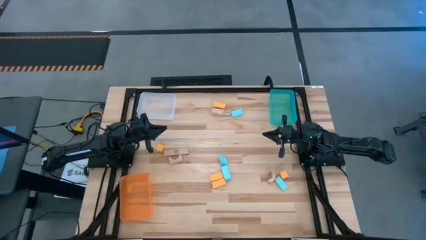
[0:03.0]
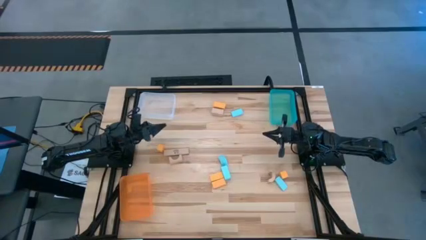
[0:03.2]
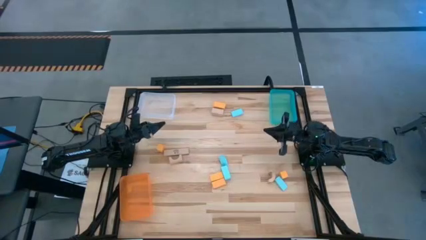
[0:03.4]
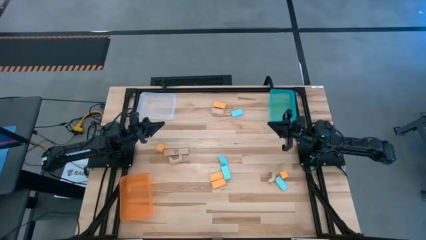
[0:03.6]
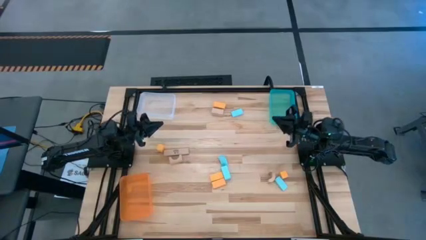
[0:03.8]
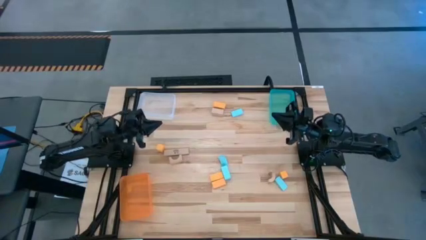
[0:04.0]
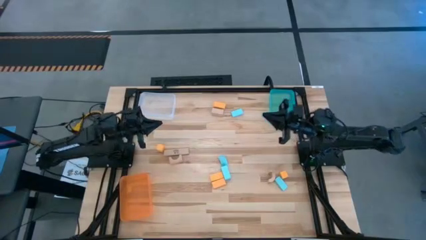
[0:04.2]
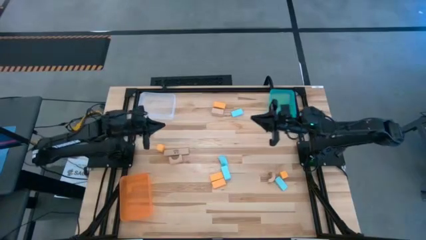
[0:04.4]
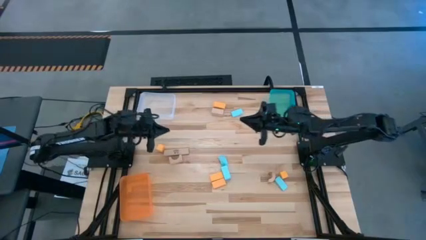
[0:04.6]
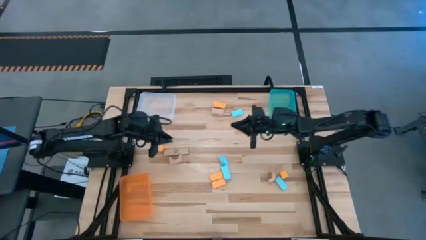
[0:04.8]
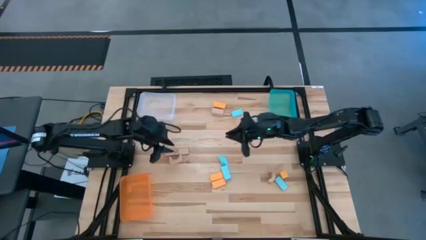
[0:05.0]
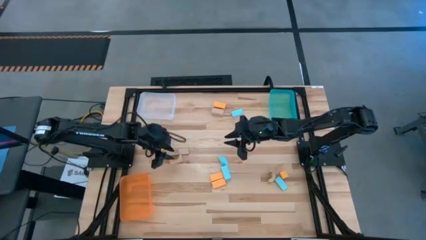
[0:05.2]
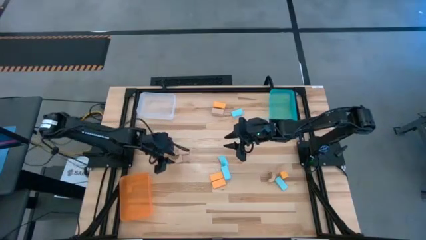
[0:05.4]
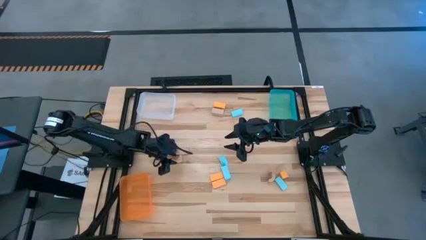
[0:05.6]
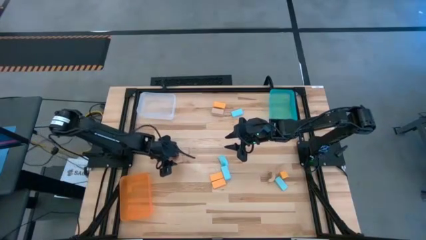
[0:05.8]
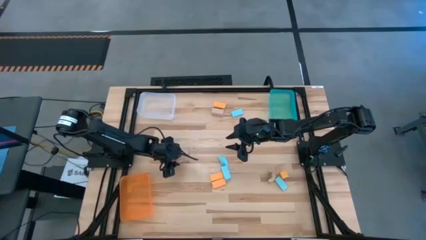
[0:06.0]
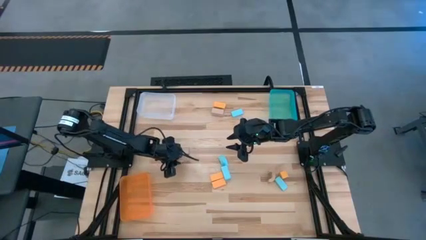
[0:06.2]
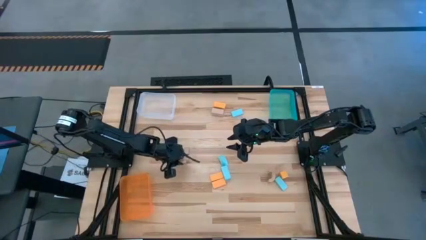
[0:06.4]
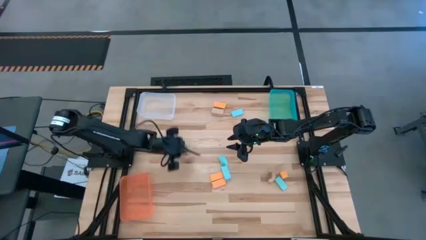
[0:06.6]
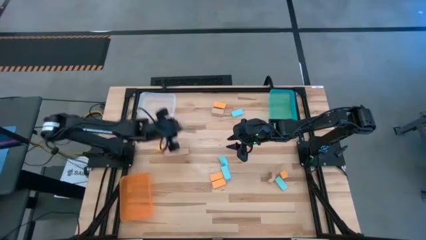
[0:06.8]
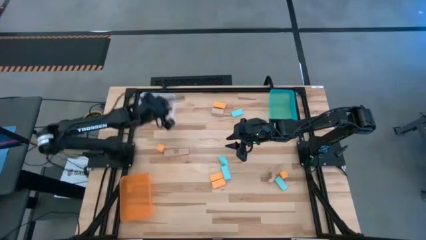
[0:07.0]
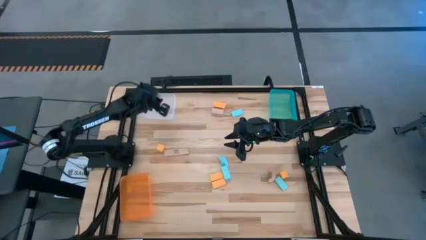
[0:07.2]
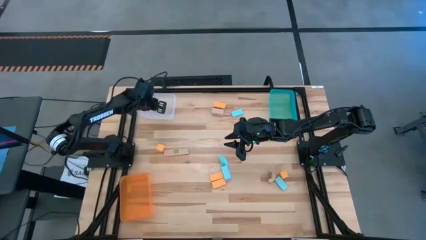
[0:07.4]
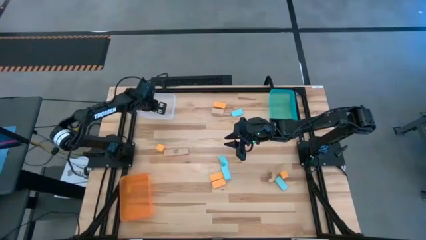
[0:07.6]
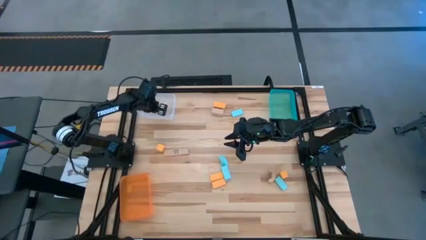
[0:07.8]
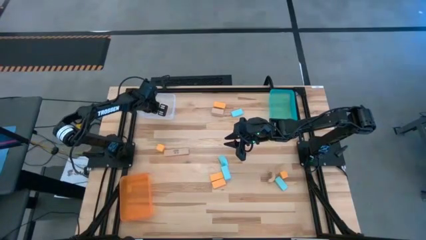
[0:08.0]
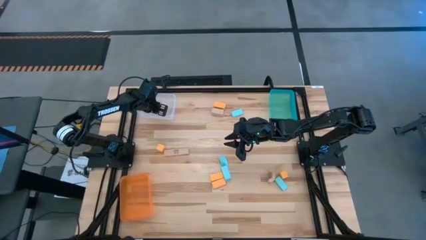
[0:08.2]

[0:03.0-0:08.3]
Task: Sort & place blocks by color
Put the brown block into the transparent bin

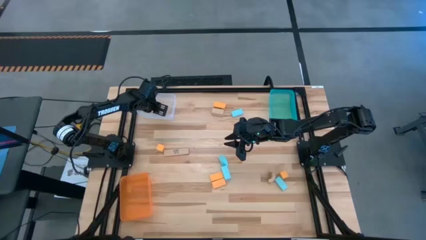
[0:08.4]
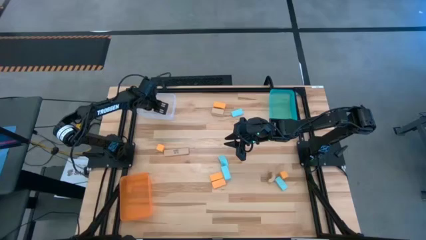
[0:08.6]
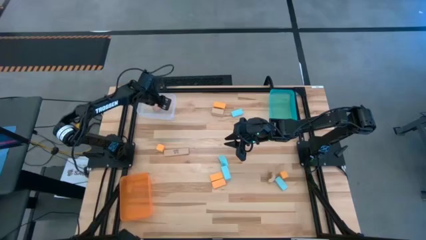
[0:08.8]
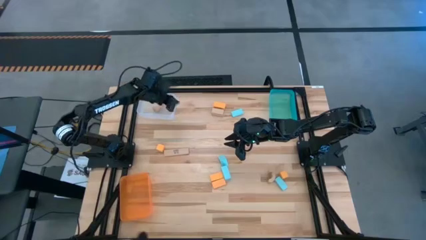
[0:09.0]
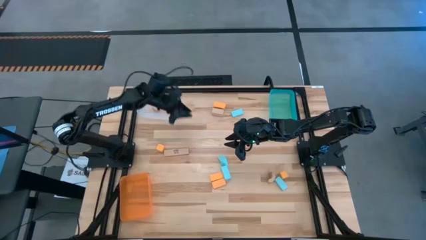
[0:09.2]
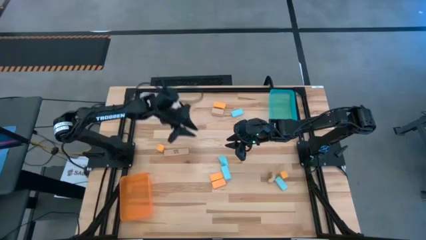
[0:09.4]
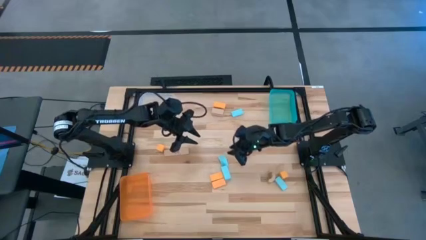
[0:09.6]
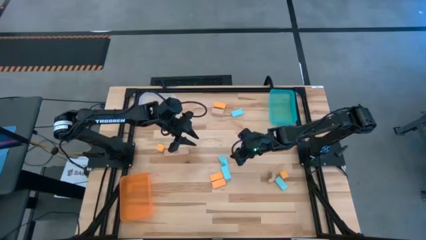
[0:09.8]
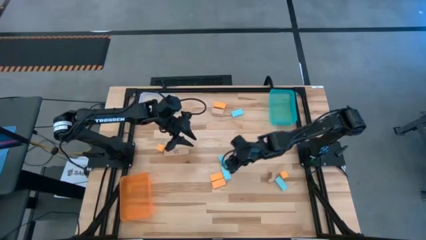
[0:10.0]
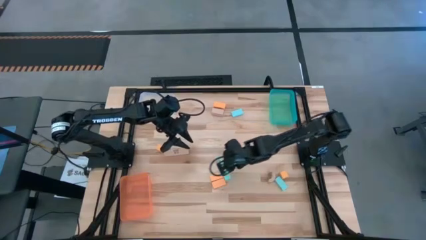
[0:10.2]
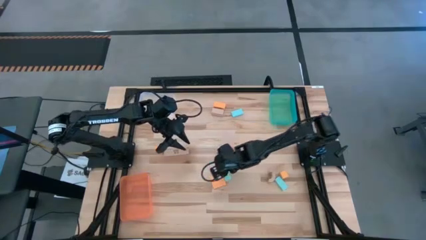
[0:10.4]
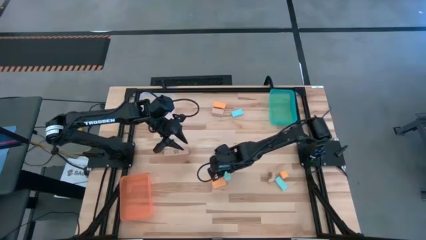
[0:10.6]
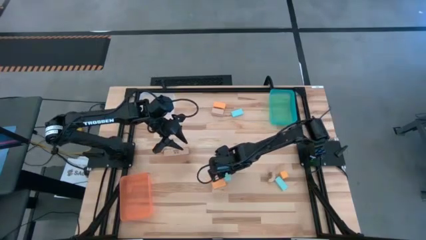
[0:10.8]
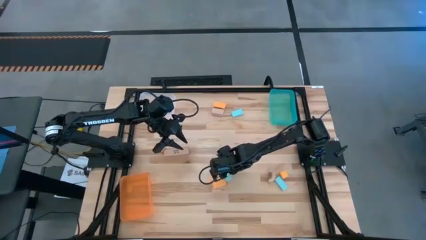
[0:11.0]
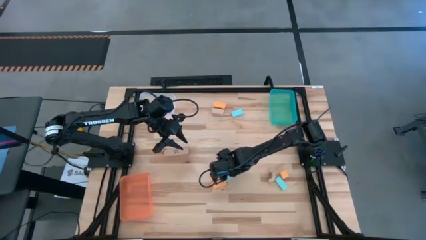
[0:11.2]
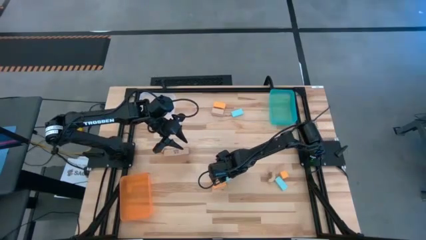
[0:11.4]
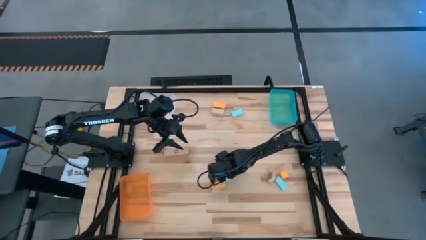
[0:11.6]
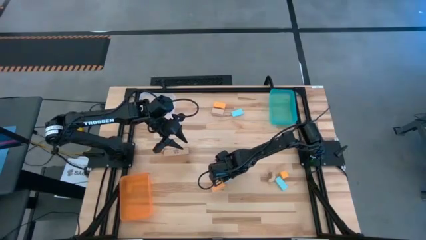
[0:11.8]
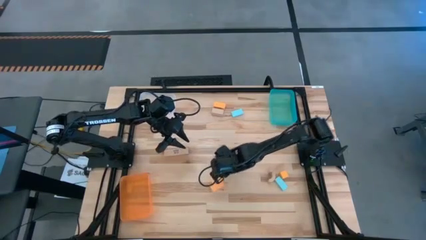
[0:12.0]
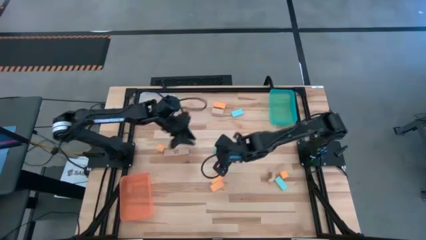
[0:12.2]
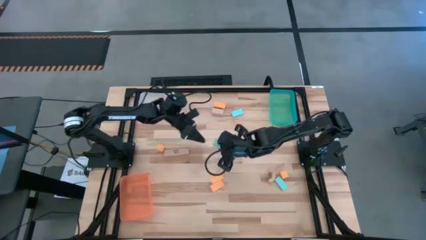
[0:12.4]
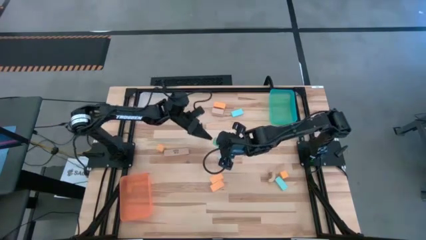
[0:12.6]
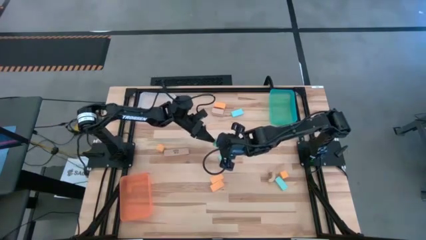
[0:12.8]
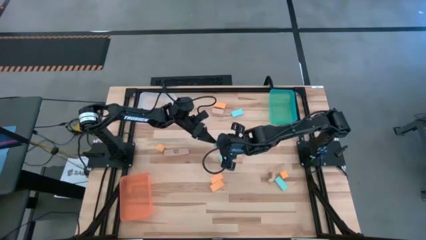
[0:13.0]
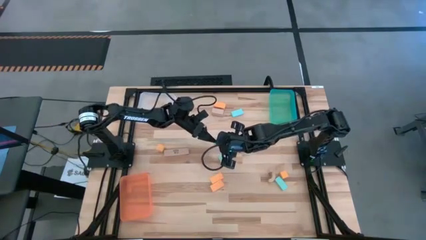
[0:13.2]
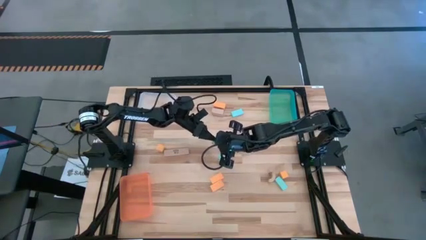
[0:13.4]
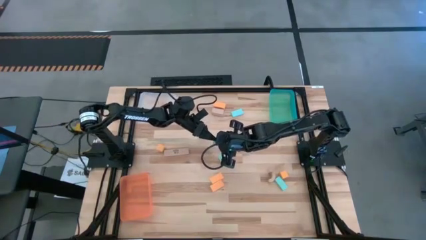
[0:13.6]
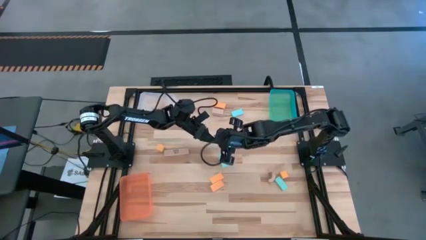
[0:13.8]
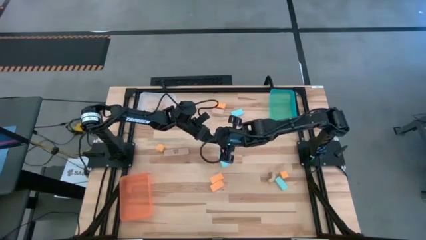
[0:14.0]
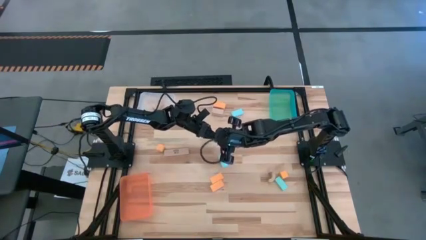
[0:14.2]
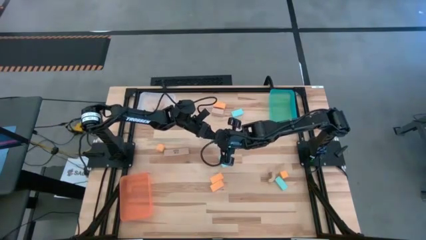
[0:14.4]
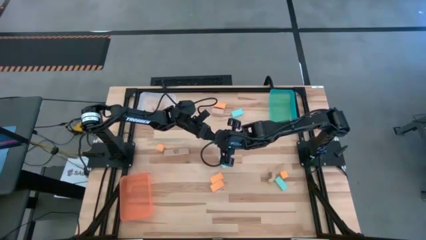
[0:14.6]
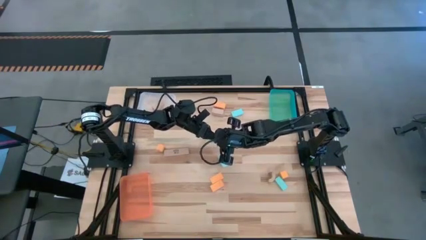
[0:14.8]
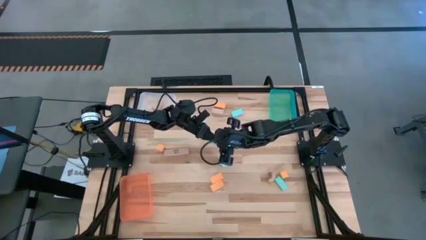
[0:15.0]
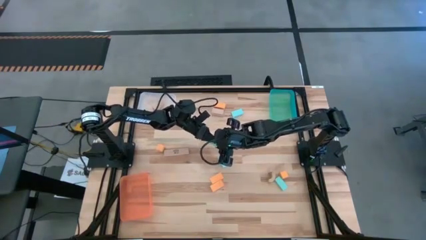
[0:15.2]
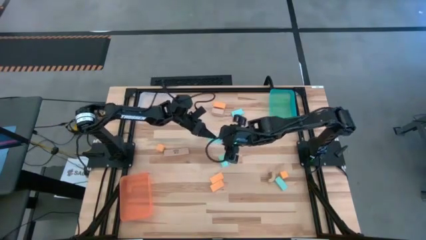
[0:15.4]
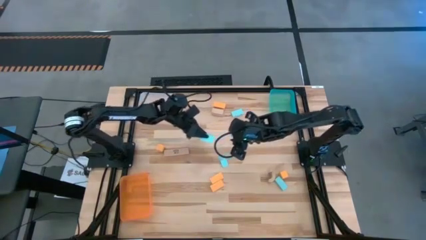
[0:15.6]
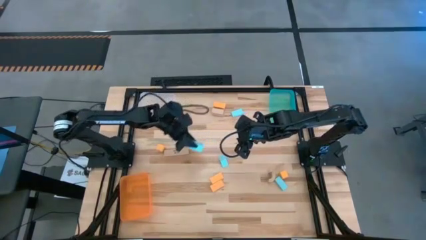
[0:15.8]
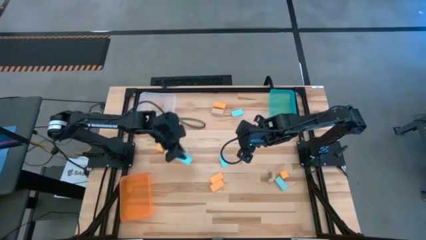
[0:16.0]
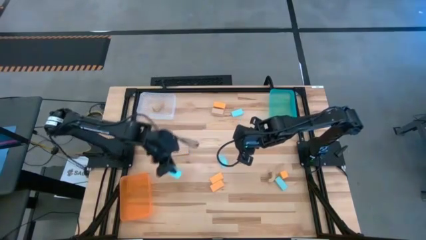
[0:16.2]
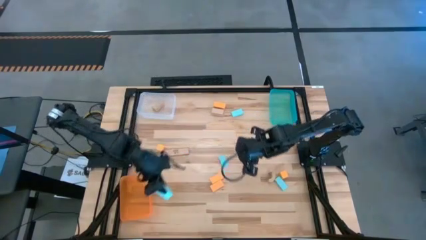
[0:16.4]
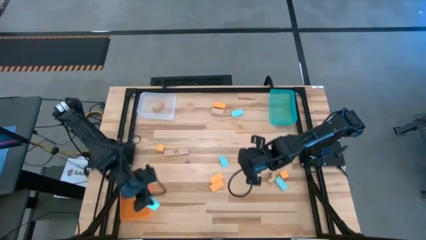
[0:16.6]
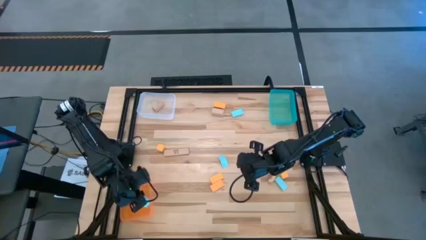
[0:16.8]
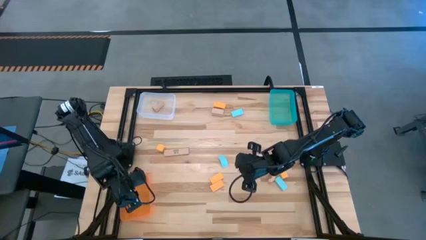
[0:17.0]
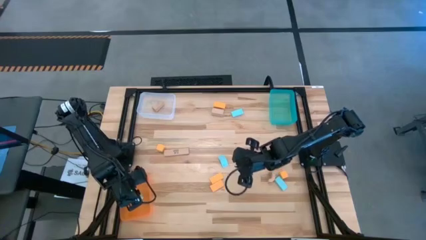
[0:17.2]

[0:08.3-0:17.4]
Put the light blue block into the orange bin

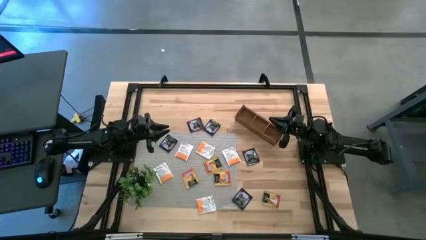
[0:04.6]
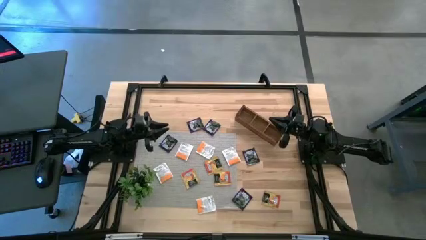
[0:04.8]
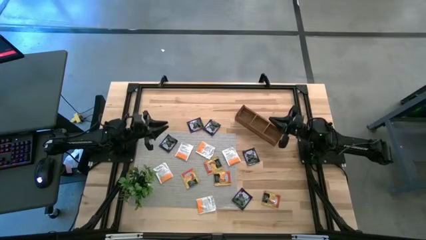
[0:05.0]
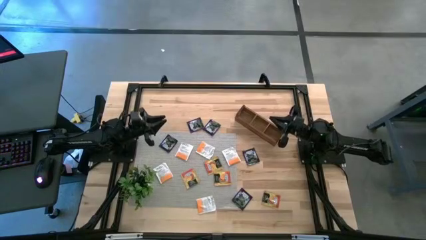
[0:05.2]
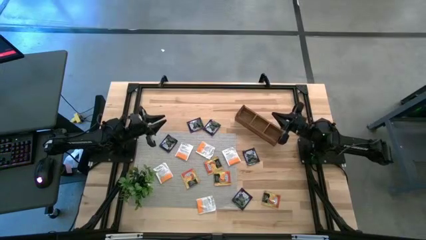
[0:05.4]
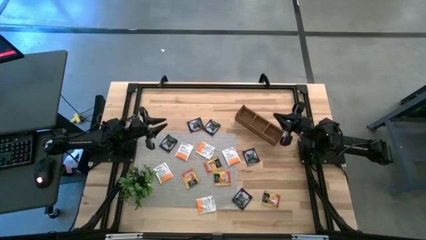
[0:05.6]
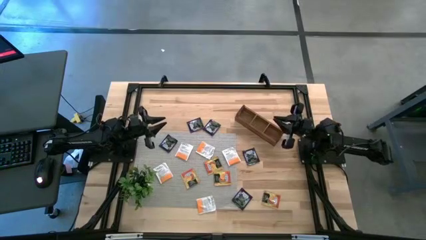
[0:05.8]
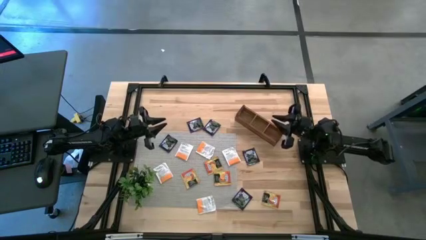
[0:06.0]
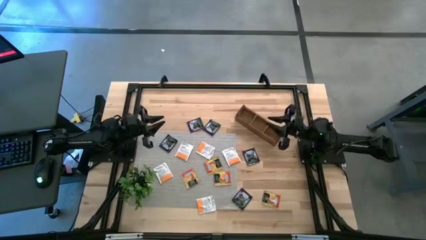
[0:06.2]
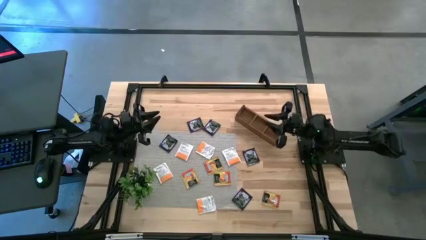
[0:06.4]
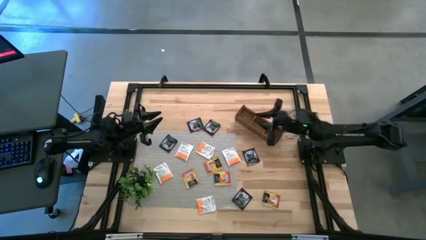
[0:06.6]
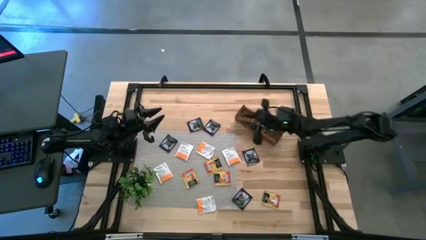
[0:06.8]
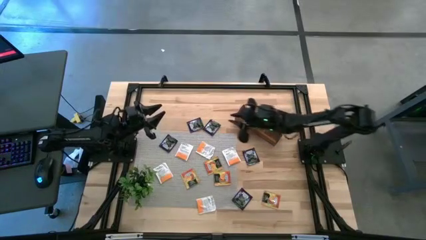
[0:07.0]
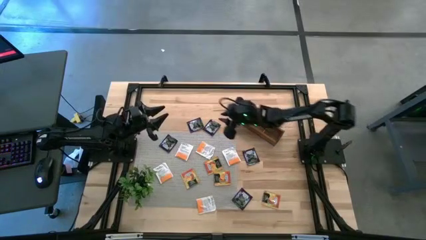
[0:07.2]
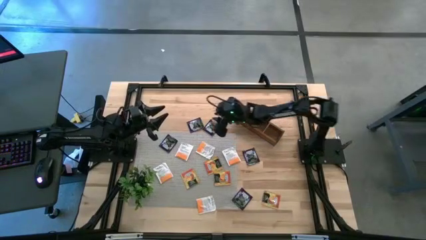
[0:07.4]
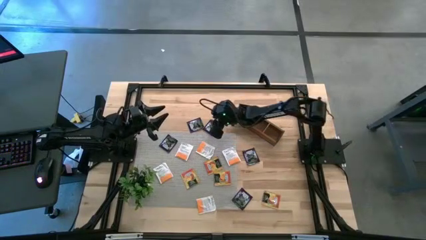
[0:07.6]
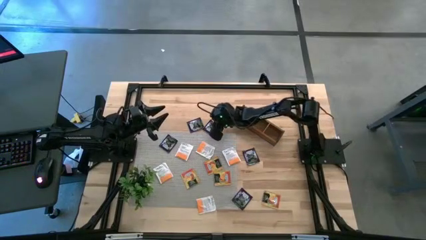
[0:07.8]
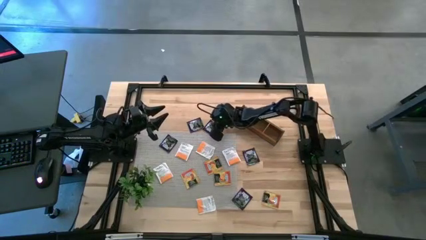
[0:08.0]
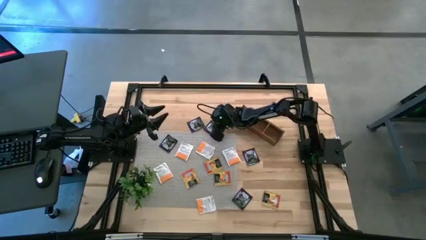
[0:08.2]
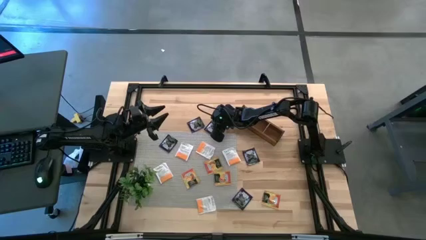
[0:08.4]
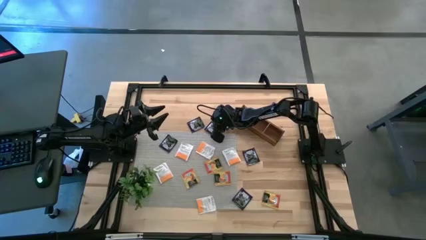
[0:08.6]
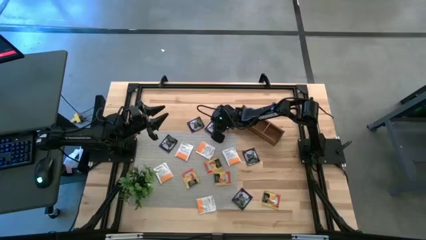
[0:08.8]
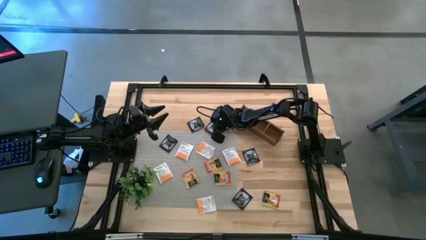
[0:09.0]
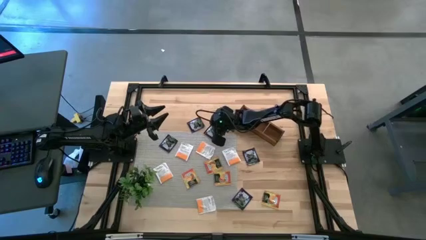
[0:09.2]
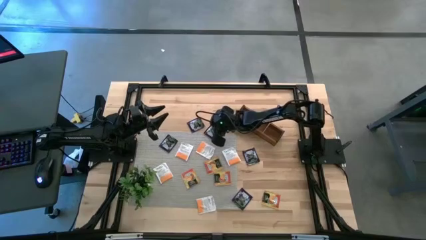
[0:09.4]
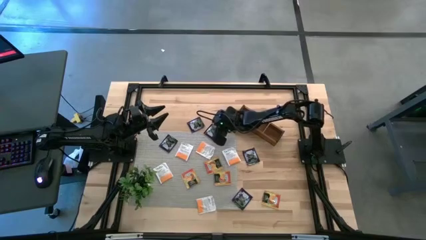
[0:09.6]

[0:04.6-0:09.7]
Task: Pick & Place Tea
Put the black tea bag into the left section of the wooden organizer
